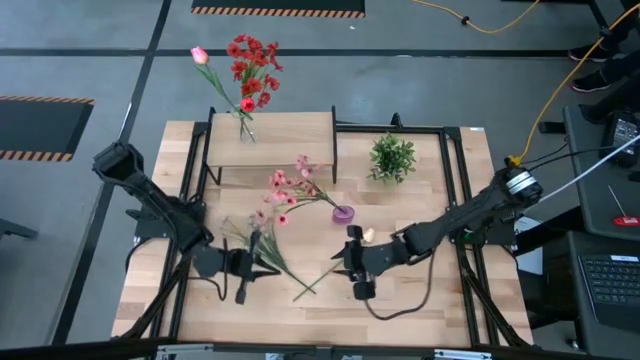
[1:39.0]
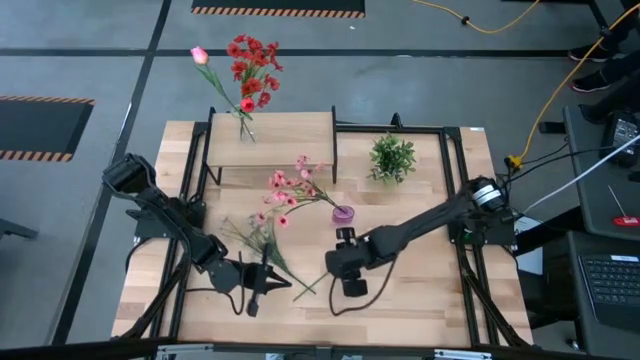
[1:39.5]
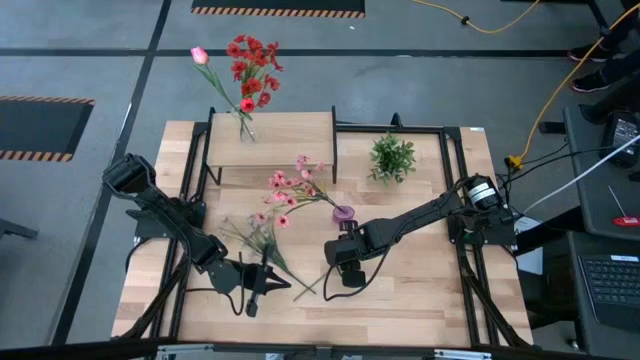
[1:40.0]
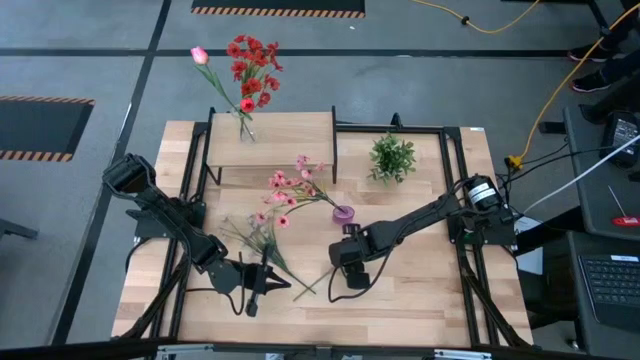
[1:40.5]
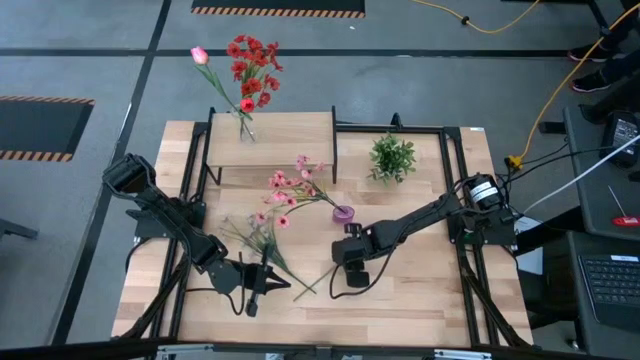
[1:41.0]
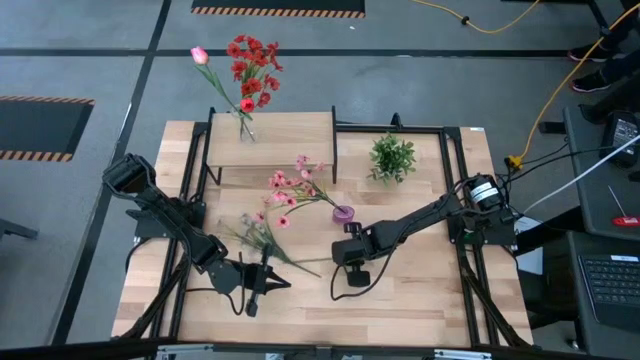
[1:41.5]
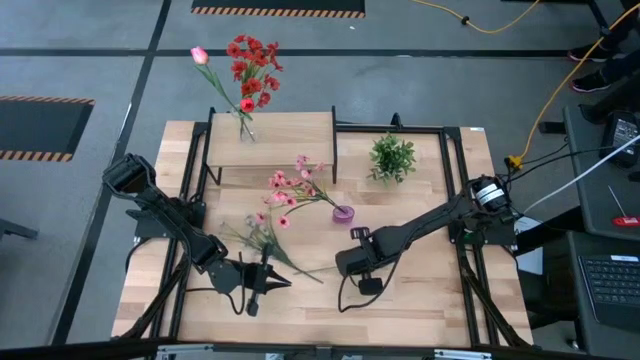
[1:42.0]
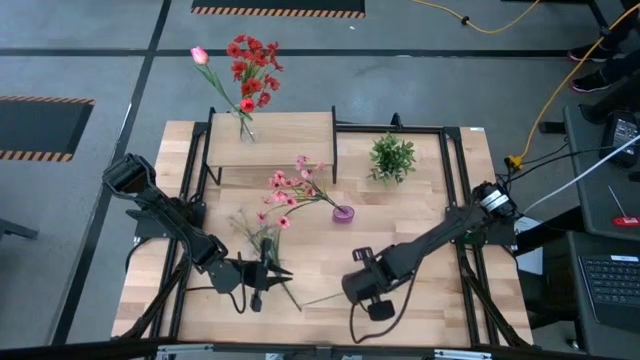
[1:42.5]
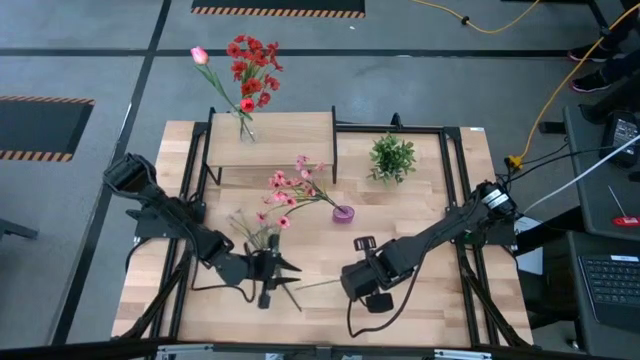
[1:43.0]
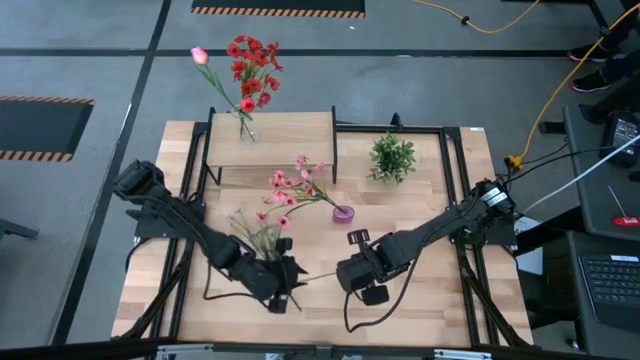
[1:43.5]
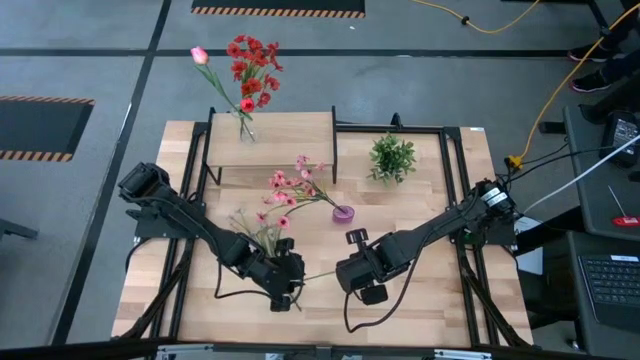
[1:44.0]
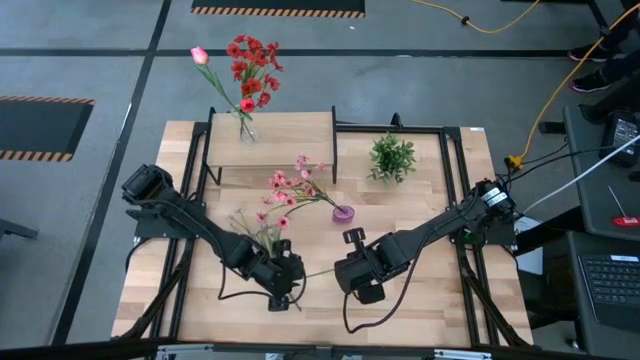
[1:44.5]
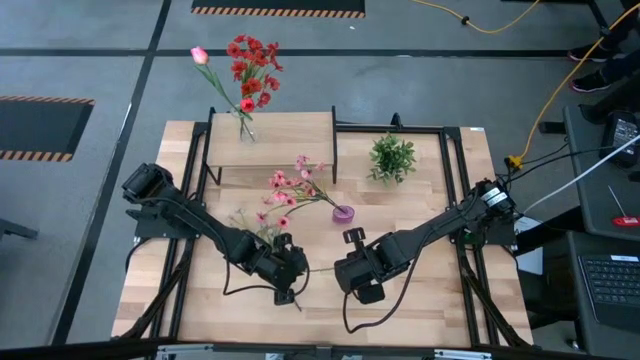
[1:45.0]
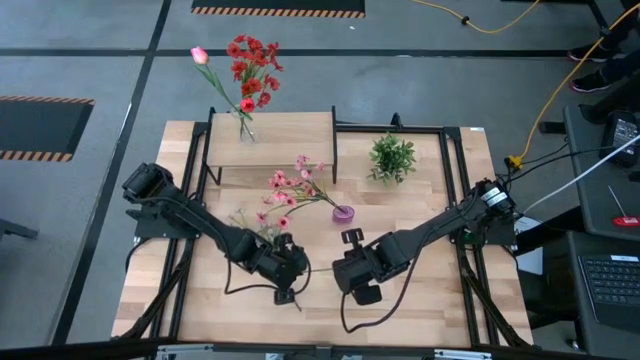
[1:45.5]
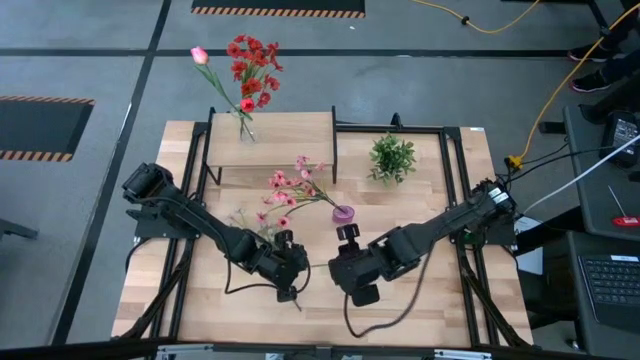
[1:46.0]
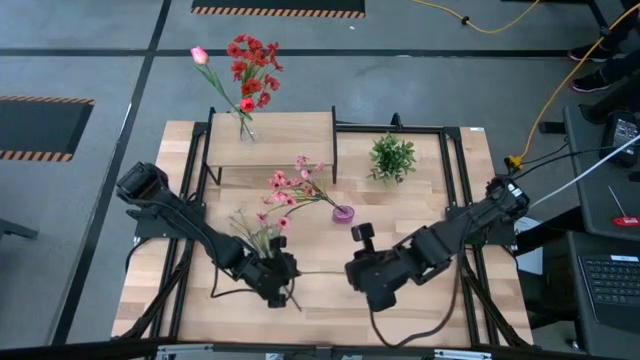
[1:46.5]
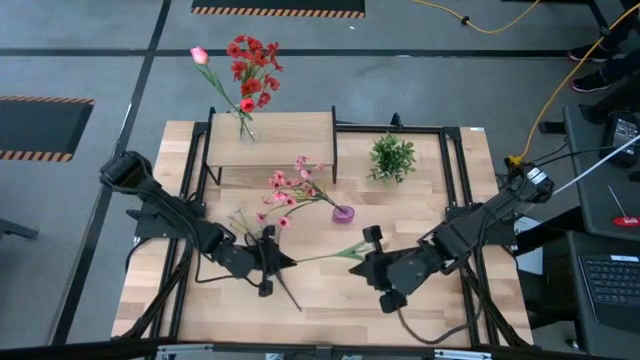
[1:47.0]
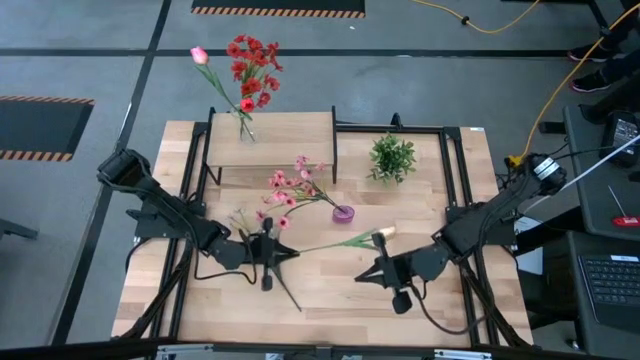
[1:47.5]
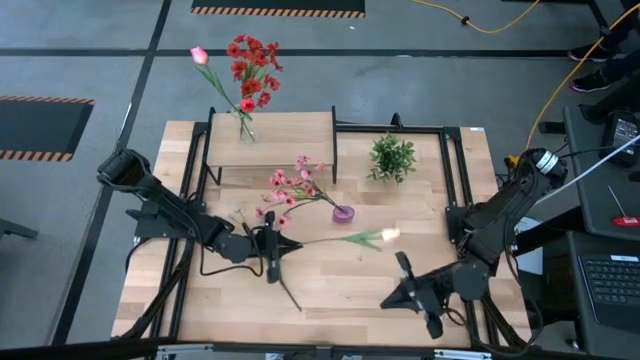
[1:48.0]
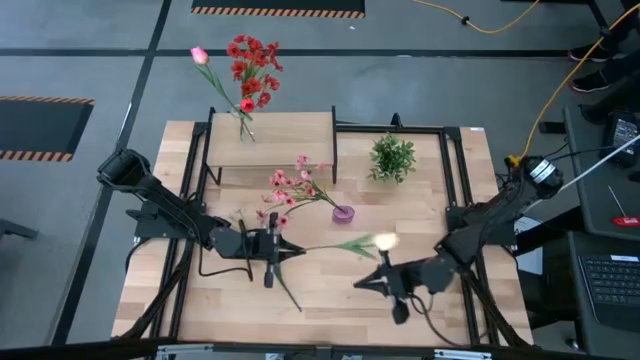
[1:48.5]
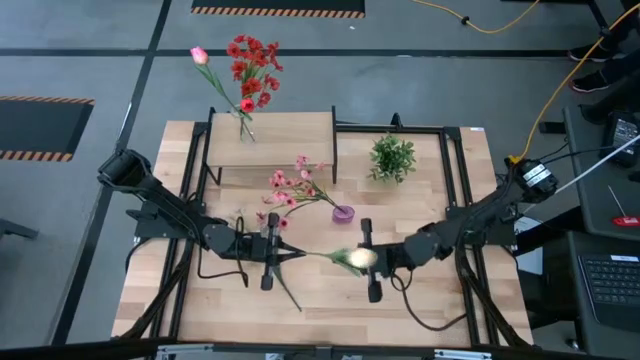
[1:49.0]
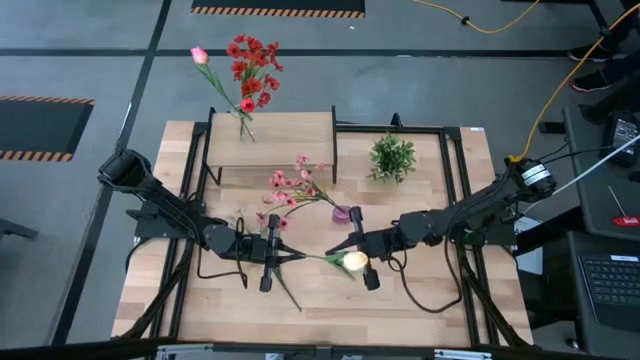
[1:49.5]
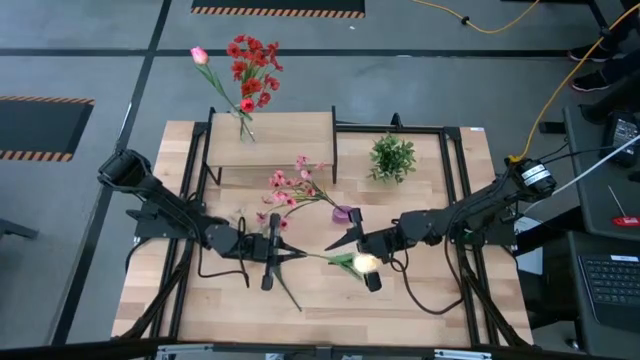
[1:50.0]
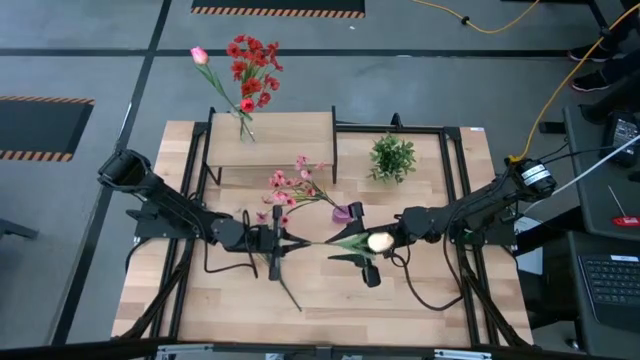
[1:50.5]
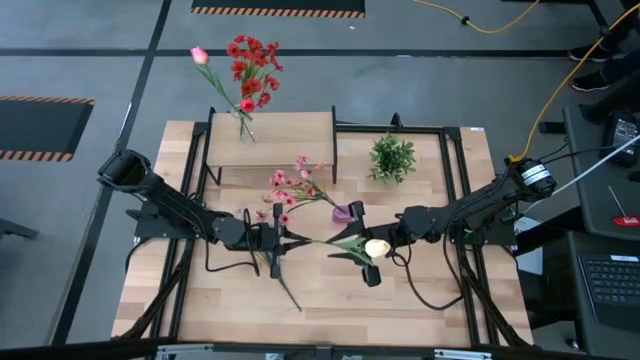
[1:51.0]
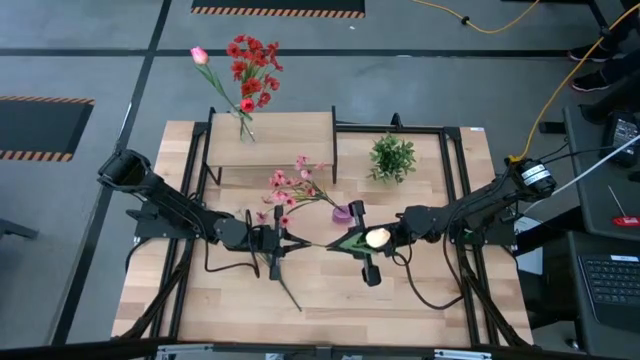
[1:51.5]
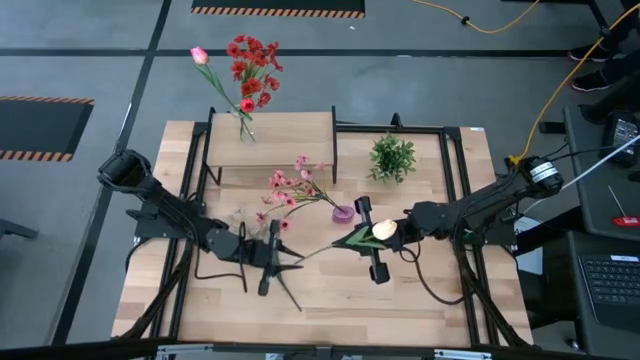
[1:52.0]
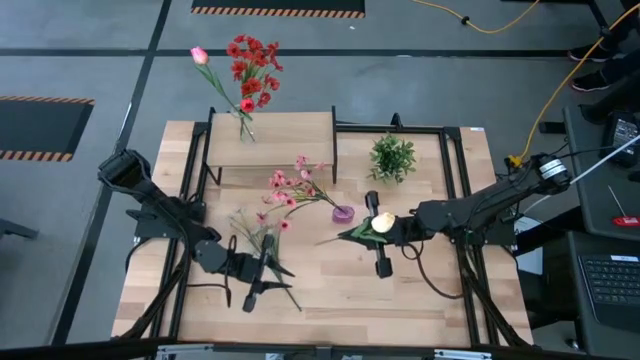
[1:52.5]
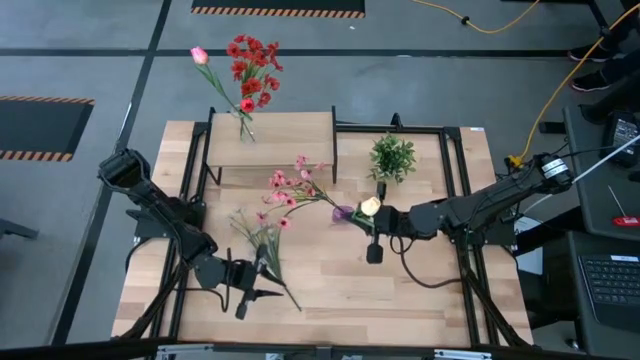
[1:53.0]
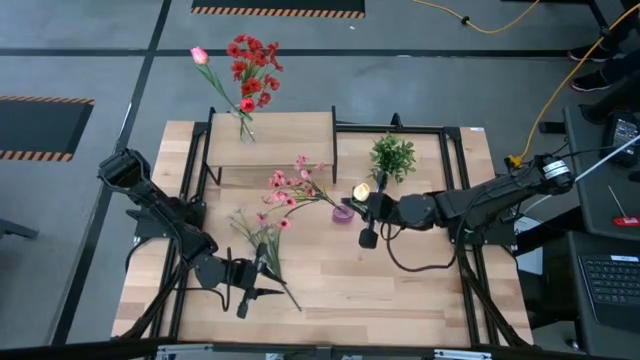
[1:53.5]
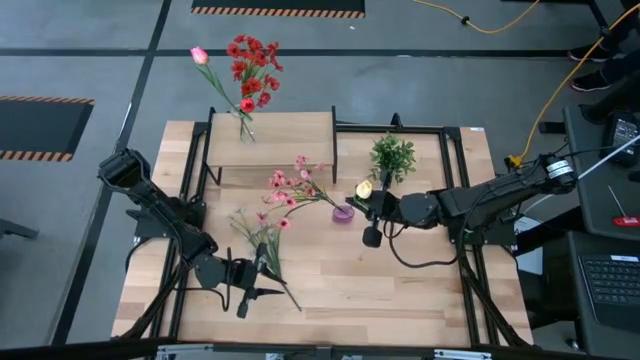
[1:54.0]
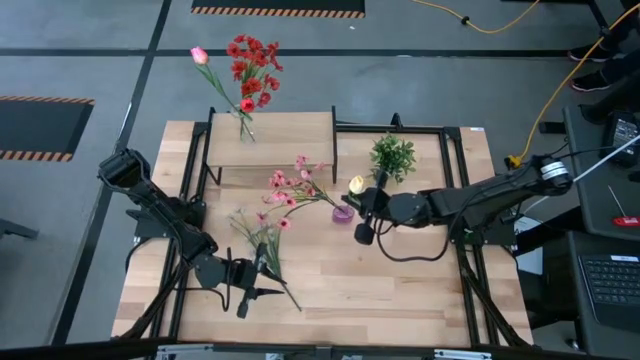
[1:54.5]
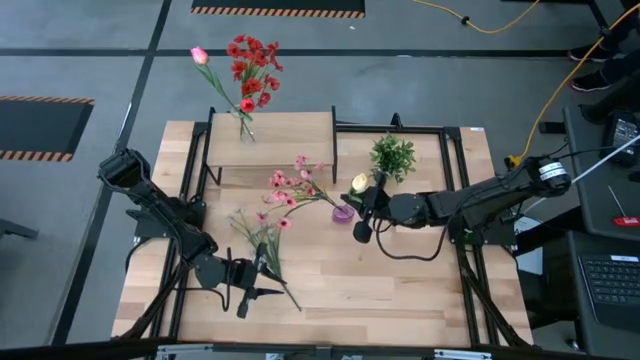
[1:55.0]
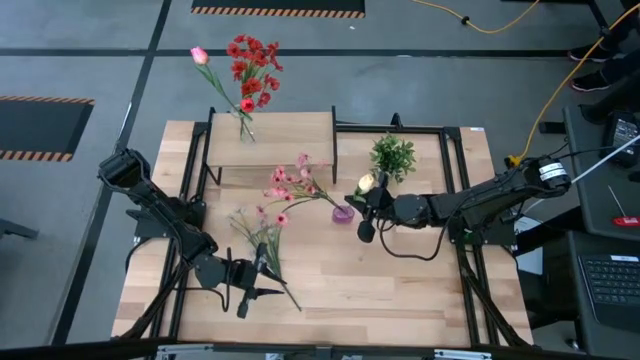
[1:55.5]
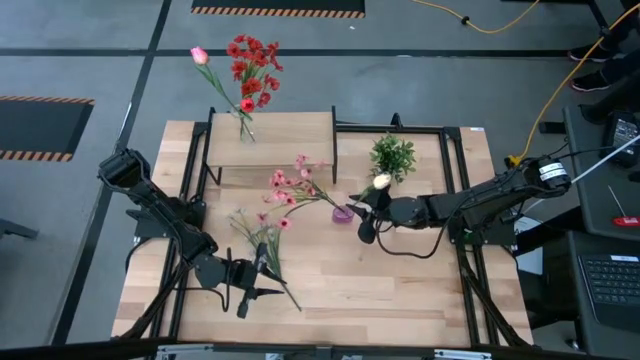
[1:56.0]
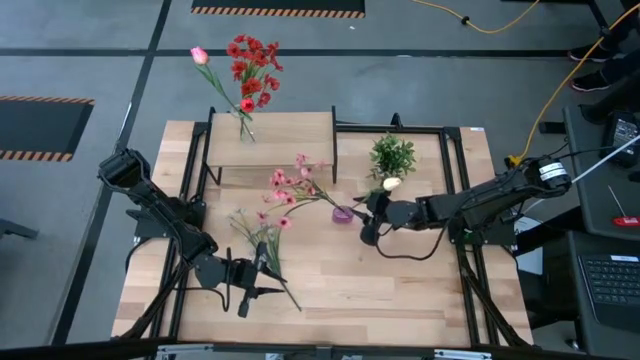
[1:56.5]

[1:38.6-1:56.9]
Task: Pick and place flowers into a vace then onto a shelf
Put the yellow tulip into the violet vase

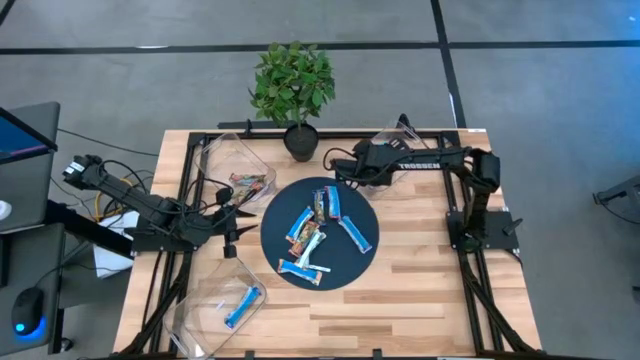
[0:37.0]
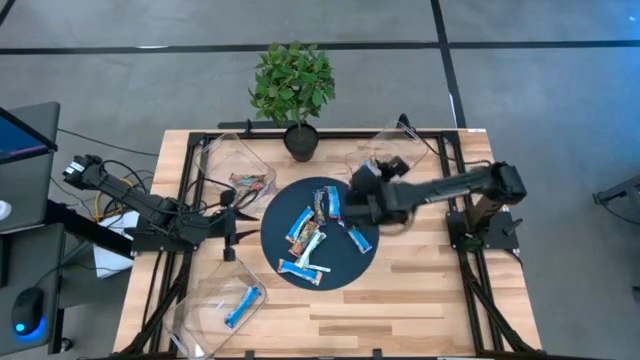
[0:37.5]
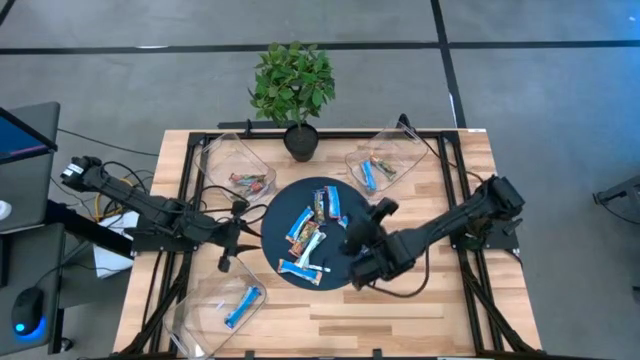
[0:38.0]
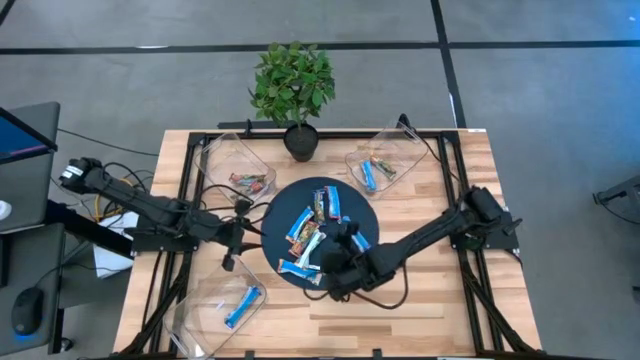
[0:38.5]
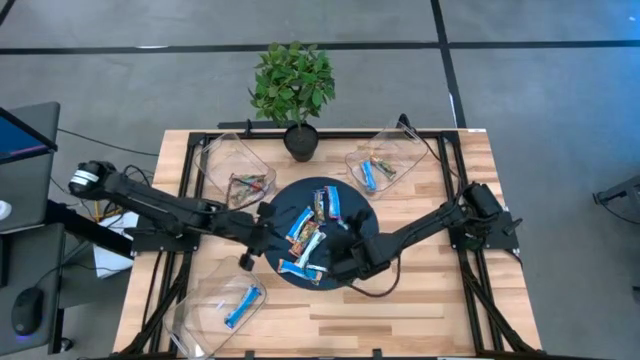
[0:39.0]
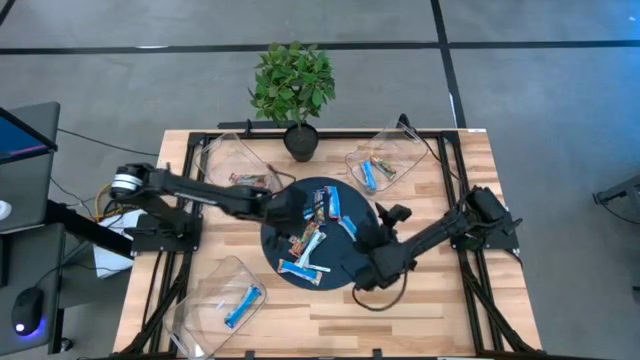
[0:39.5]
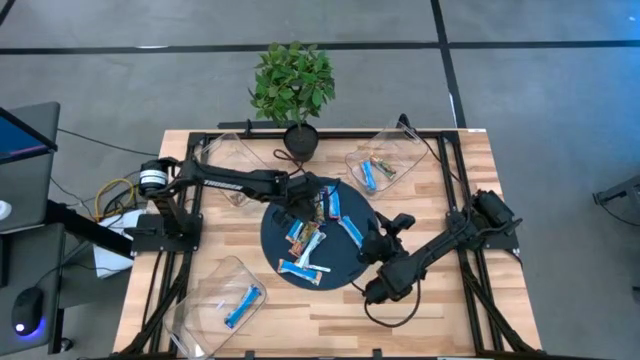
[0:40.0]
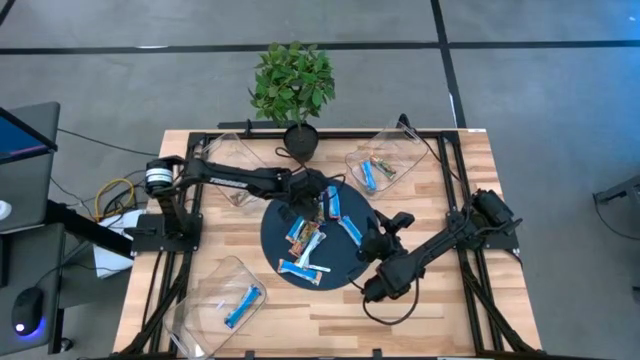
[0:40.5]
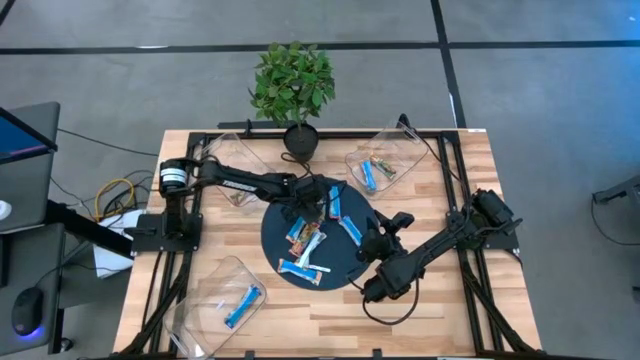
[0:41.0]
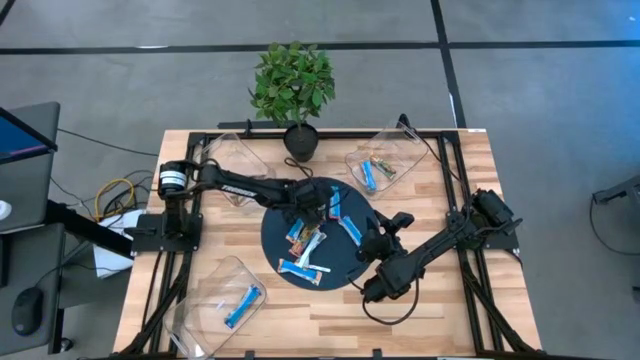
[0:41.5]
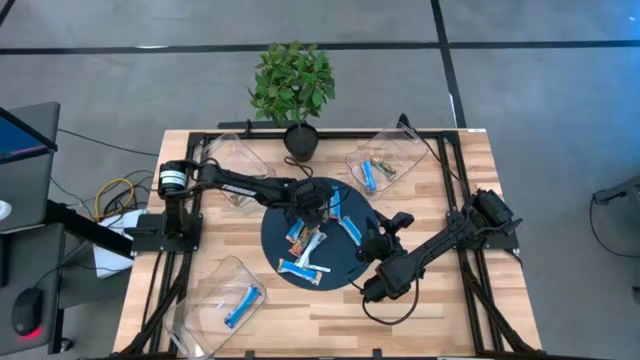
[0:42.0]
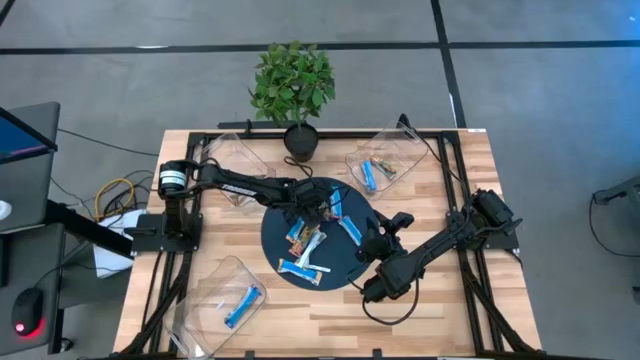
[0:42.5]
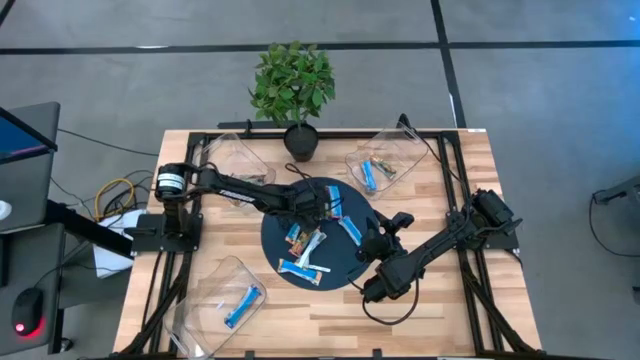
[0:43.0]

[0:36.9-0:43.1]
Task: Pick and place Granola Bars by type
Put the violet granola bar into the bottom bin
